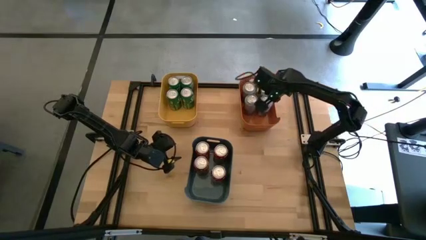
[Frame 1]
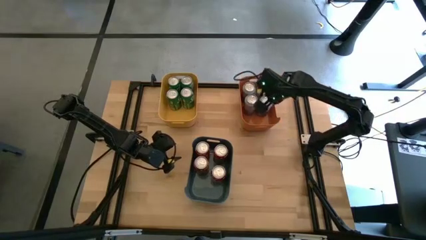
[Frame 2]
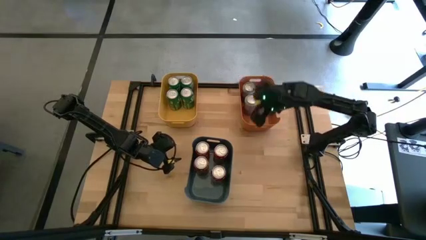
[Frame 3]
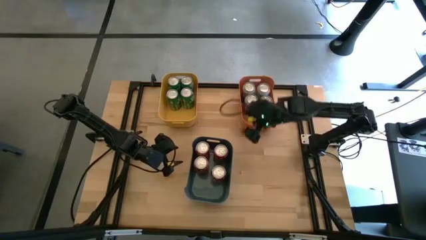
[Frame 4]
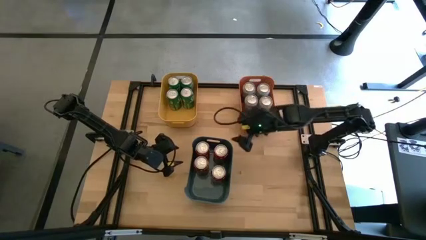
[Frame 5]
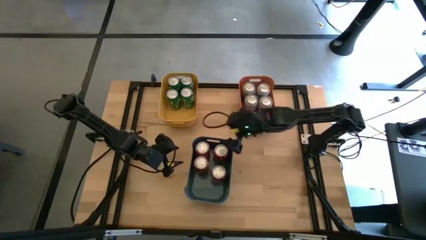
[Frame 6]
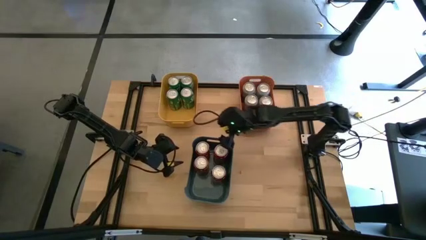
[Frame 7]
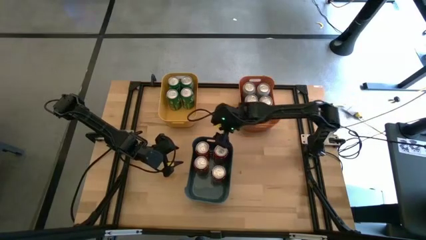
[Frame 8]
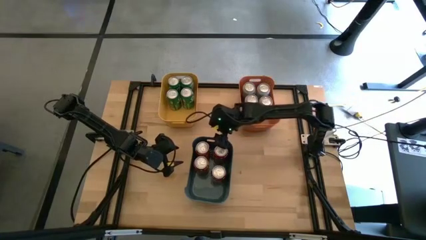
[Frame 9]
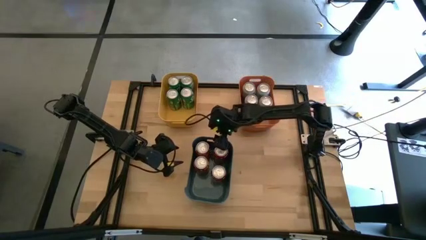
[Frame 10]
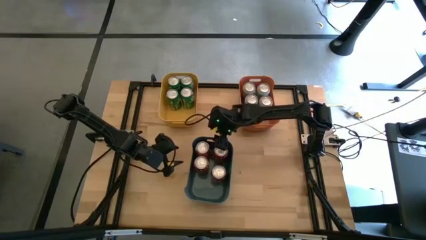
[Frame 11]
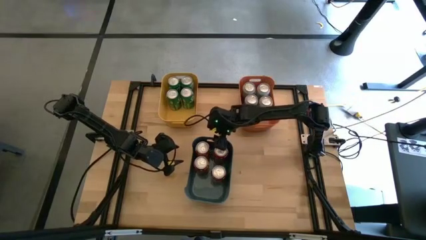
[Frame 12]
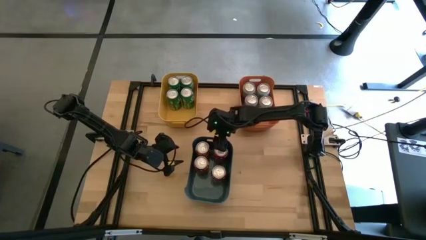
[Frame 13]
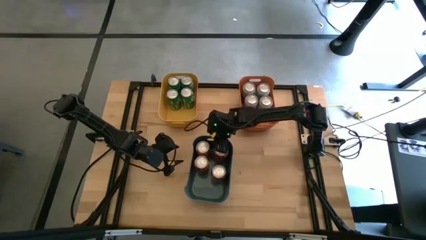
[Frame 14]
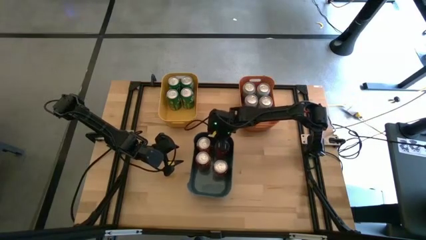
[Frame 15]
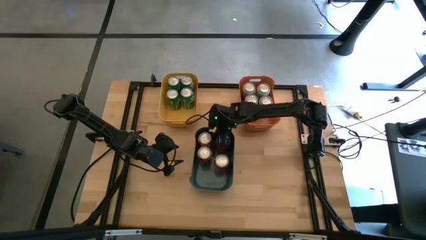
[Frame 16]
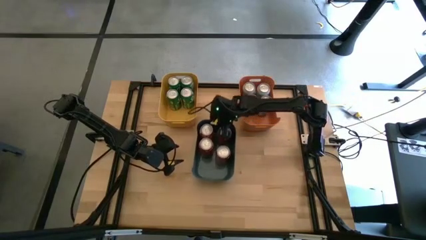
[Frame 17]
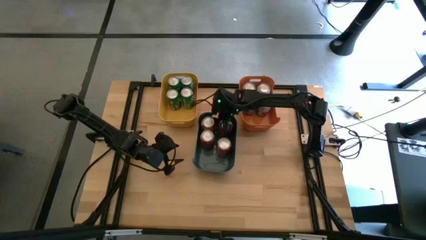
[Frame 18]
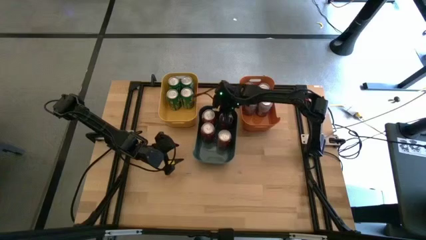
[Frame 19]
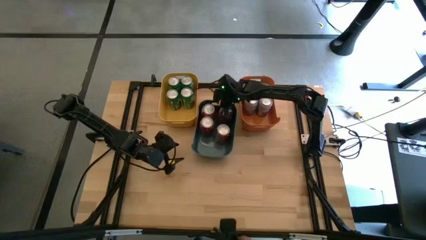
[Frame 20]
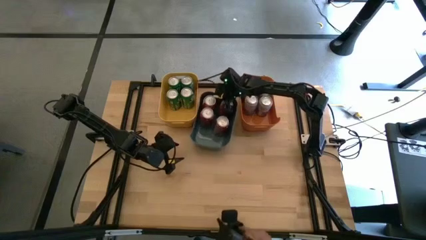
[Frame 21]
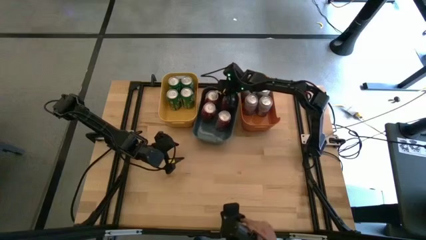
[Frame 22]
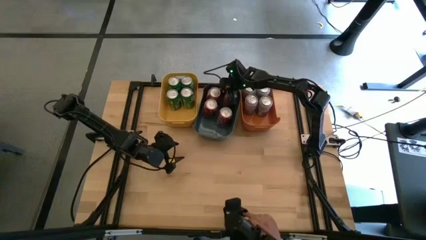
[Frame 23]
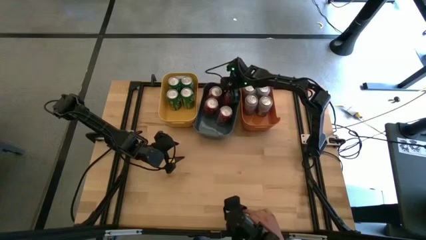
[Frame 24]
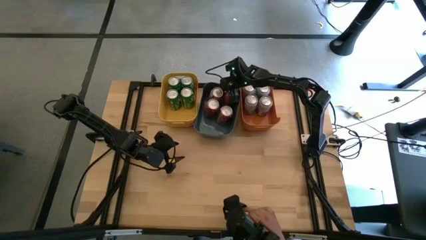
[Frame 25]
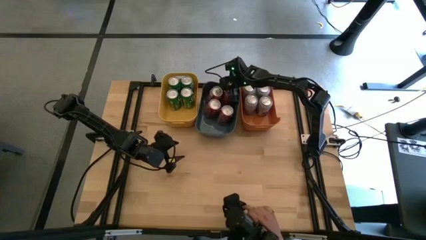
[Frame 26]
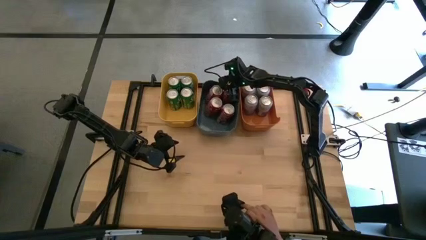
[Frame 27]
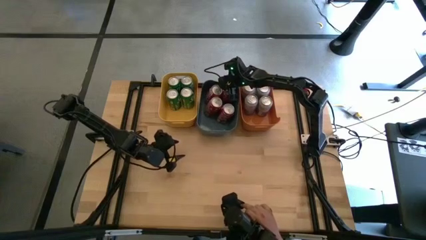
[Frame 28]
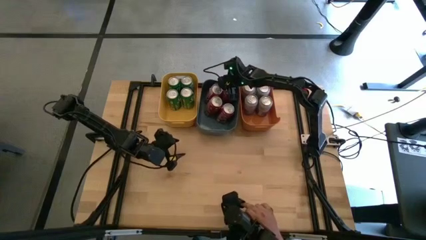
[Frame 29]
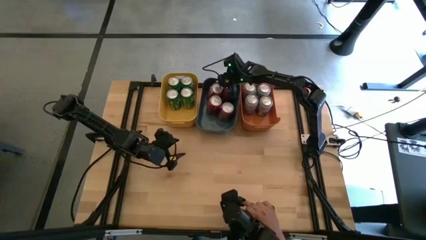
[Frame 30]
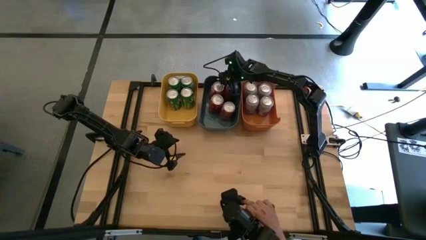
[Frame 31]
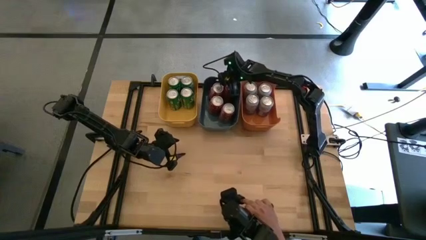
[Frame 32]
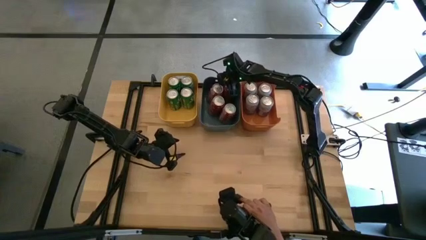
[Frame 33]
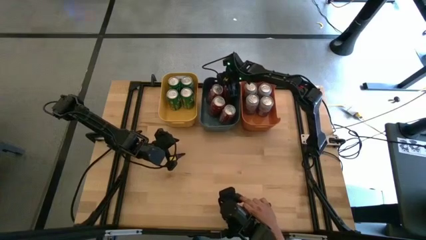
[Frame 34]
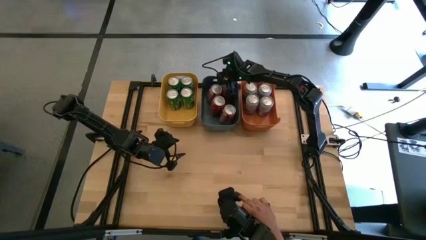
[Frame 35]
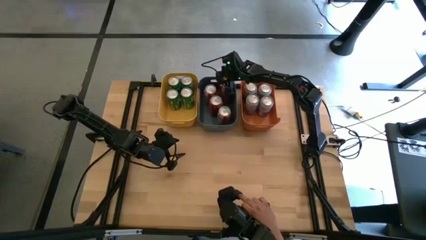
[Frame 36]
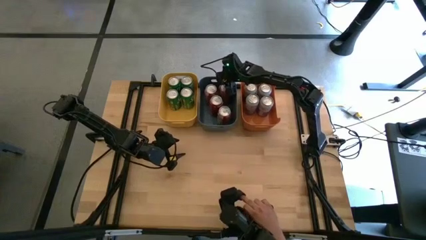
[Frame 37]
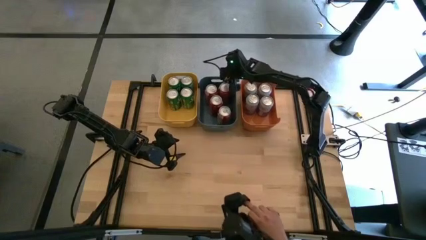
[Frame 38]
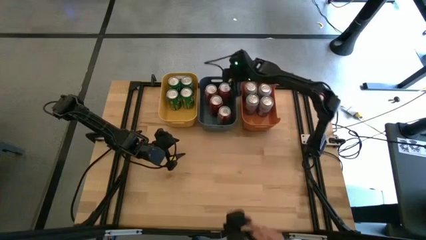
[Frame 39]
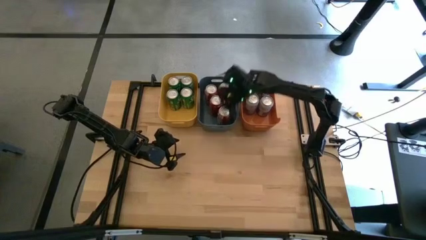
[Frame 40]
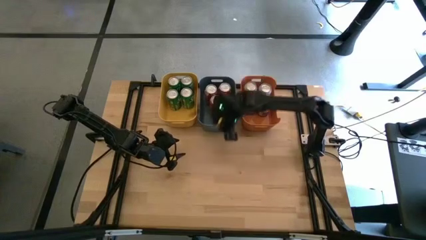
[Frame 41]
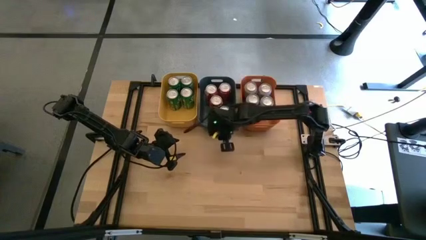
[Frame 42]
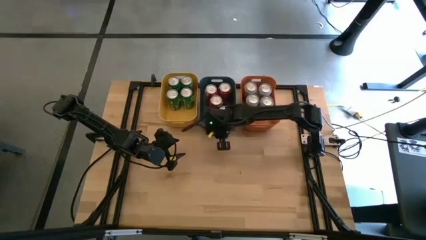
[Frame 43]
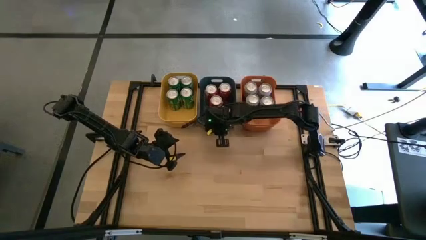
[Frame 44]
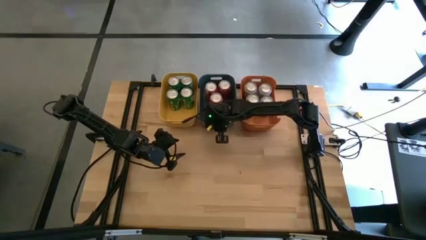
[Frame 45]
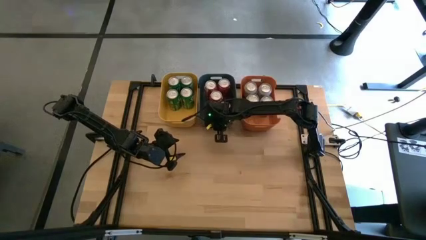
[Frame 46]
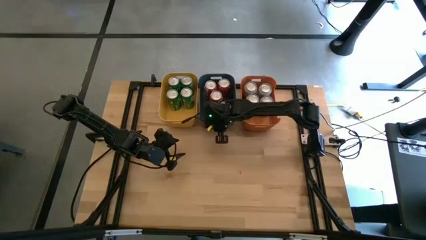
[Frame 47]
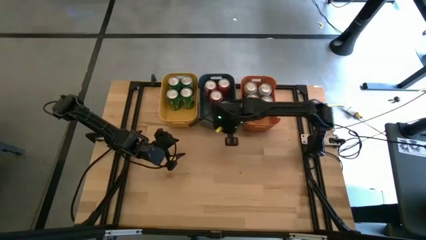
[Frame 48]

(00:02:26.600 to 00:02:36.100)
Task: Sort soda cans
Move the blue bin to the top middle of the table

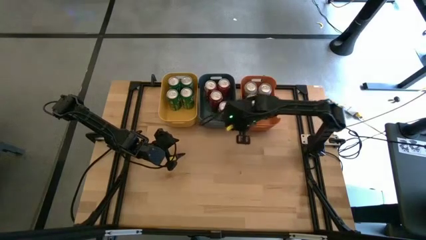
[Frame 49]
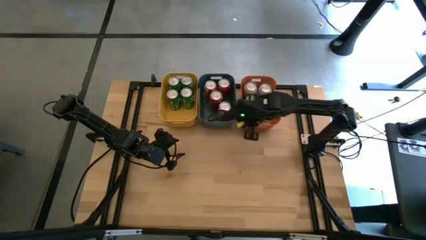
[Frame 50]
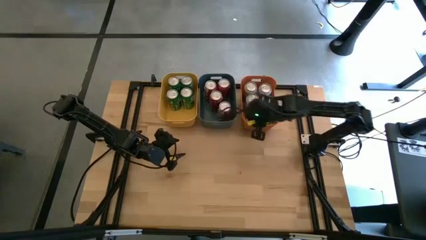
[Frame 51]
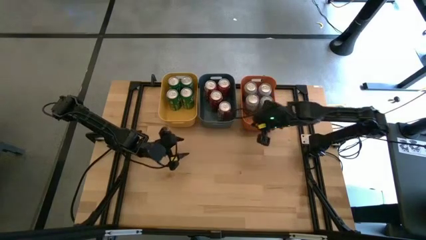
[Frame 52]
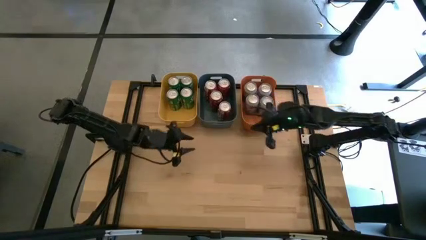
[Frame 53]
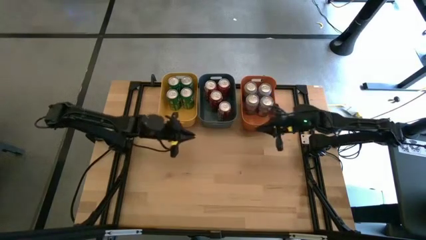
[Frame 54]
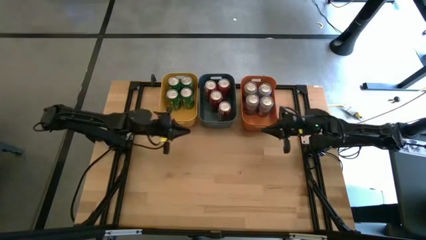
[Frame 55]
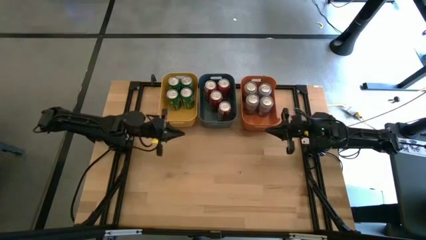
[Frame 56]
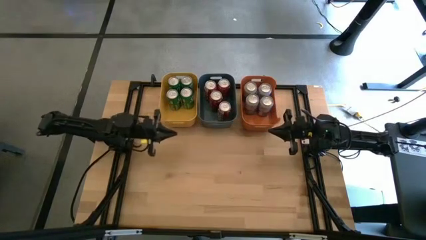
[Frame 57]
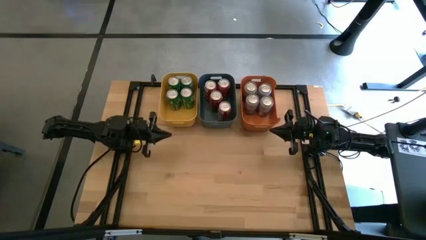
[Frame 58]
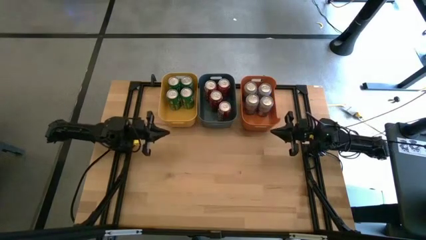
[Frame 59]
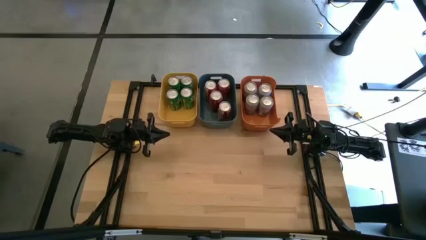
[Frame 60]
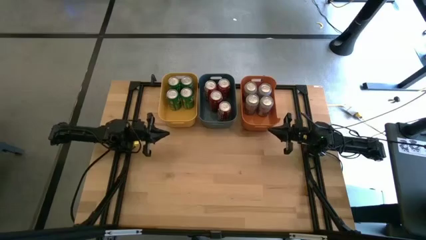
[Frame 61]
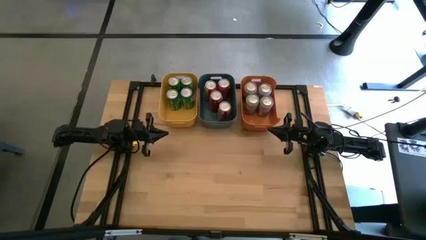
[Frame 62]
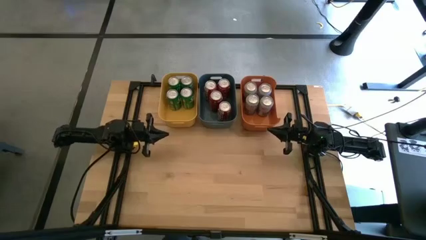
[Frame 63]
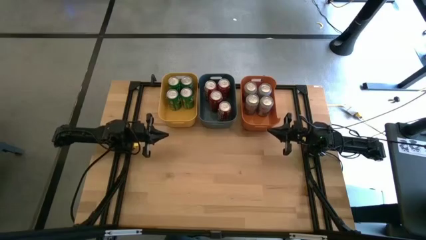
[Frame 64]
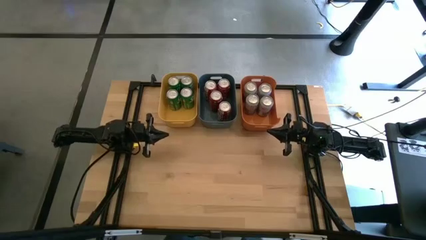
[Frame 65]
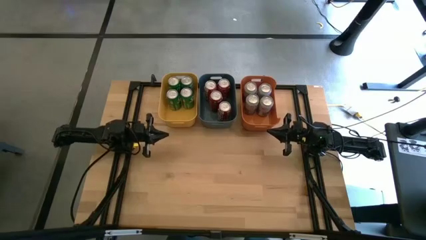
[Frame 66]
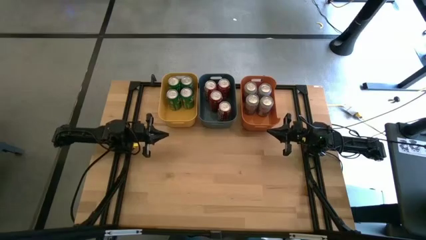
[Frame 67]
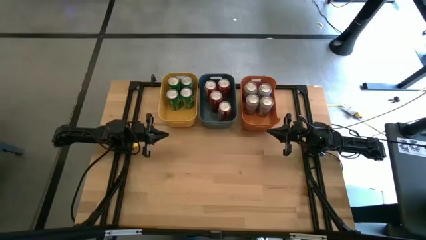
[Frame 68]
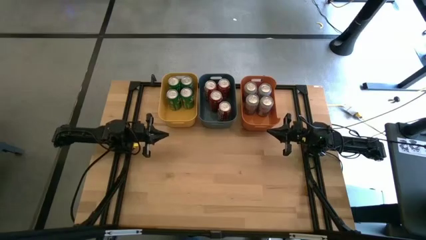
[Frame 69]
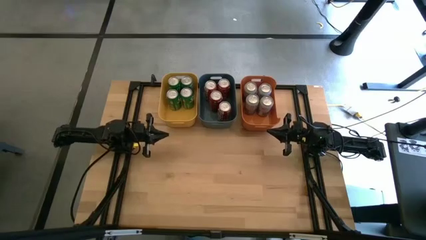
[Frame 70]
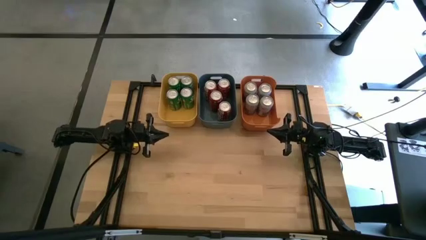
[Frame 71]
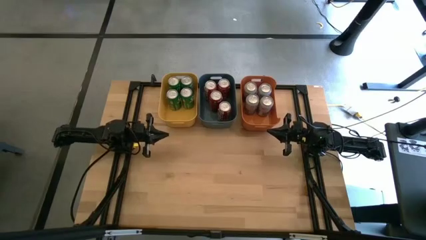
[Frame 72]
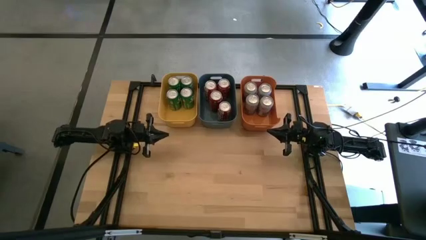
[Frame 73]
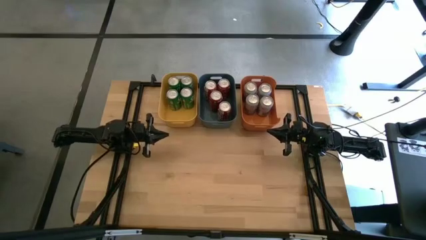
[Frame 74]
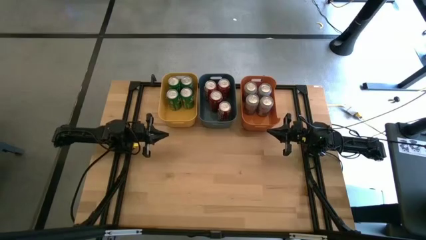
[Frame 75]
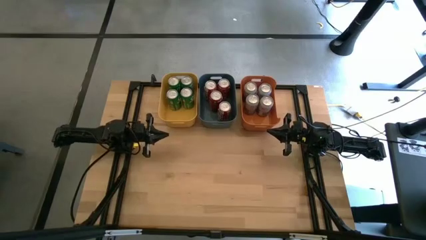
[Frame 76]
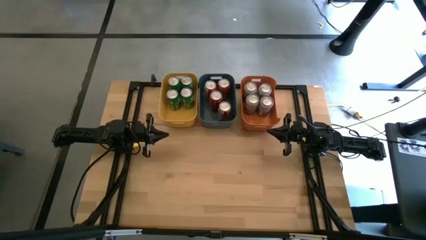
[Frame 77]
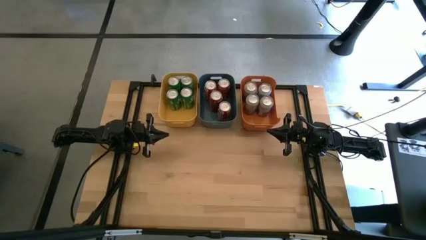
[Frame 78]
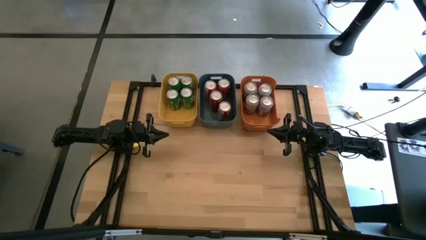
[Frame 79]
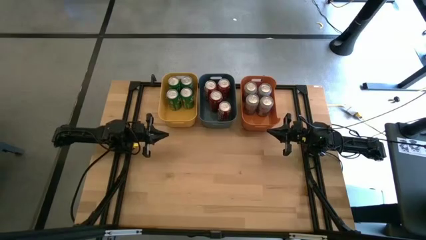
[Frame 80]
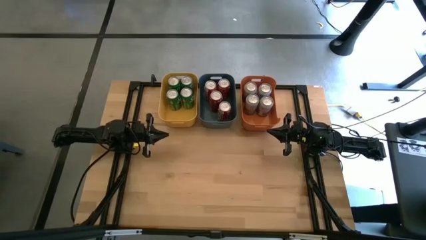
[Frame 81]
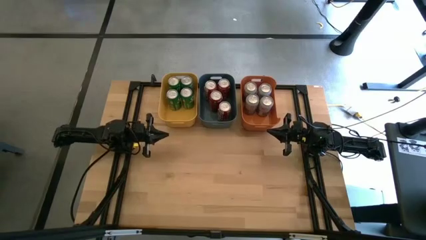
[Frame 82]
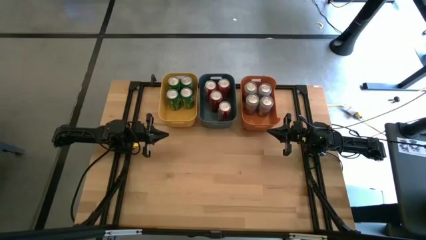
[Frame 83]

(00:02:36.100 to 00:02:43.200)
Return to Home Position

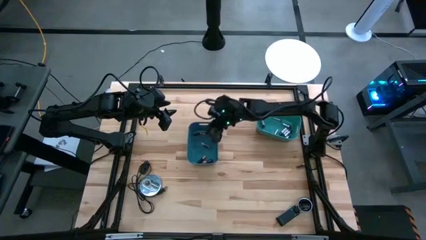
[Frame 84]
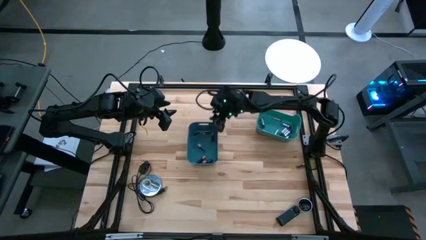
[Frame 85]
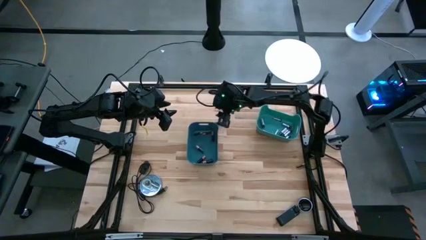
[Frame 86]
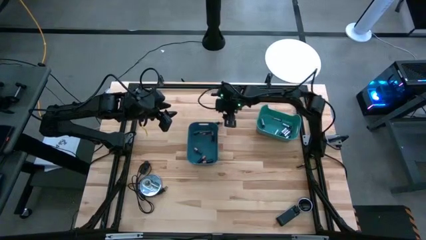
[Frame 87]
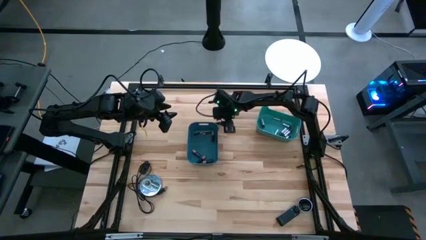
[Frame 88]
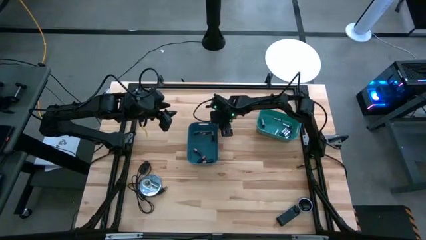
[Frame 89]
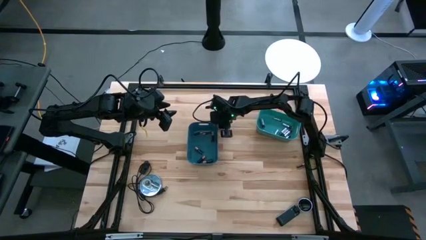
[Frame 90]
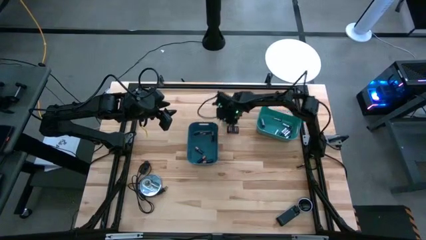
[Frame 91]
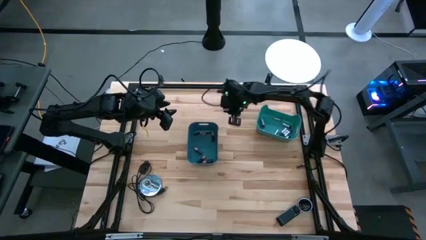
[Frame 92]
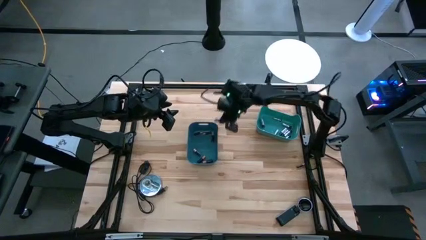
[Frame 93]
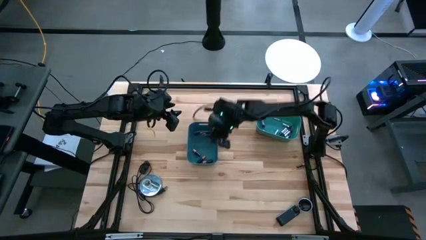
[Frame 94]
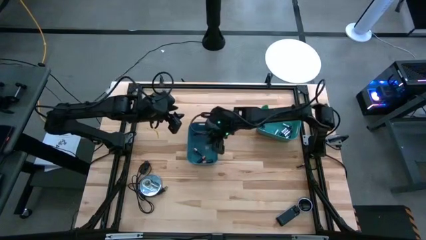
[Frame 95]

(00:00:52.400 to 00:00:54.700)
Task: Sort batteries
Put the black battery into the blue bin
